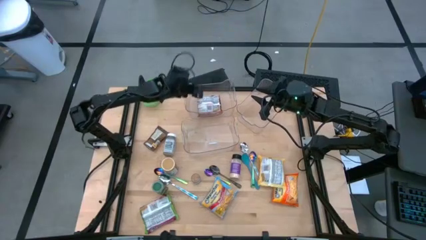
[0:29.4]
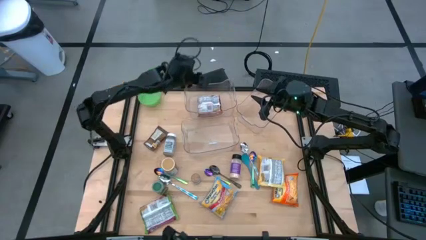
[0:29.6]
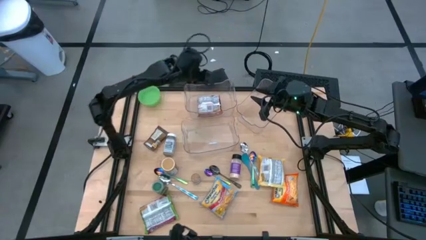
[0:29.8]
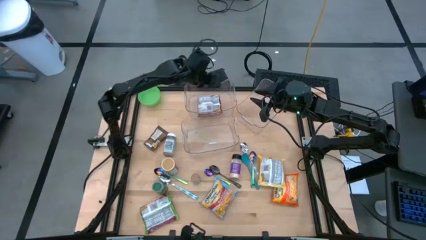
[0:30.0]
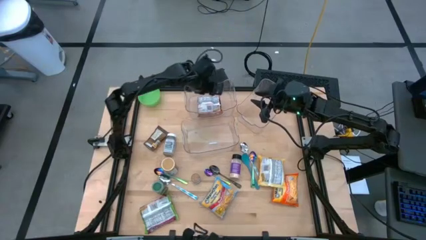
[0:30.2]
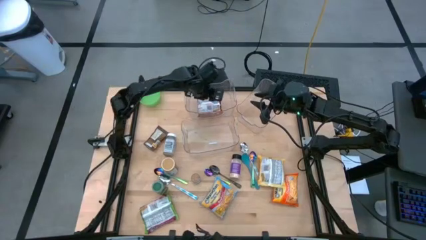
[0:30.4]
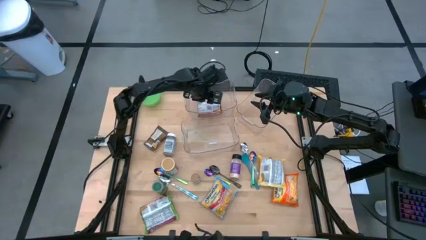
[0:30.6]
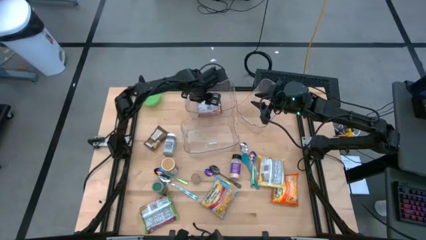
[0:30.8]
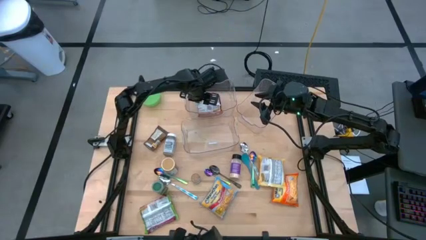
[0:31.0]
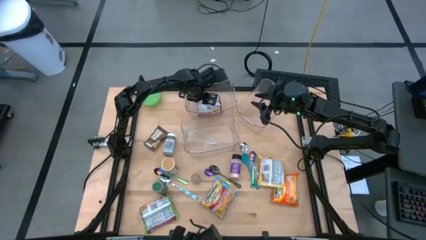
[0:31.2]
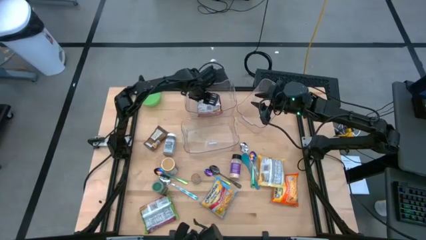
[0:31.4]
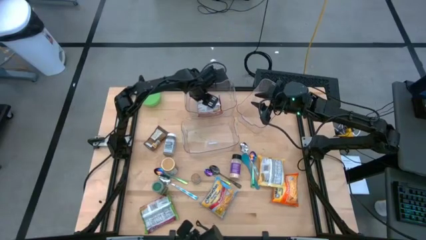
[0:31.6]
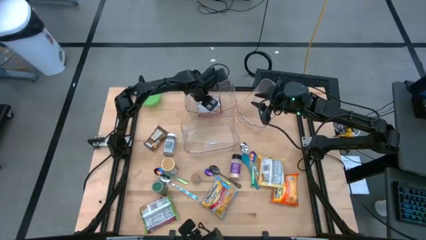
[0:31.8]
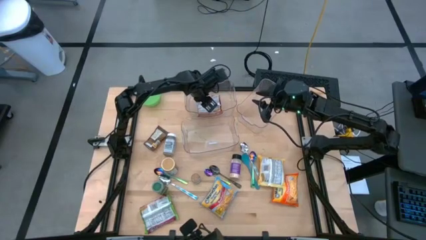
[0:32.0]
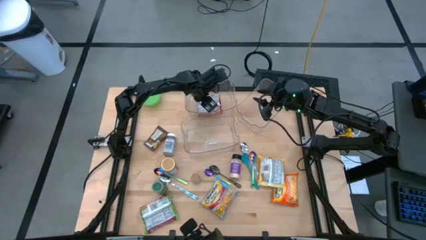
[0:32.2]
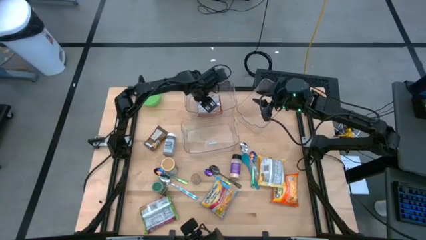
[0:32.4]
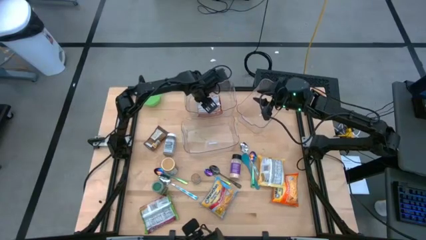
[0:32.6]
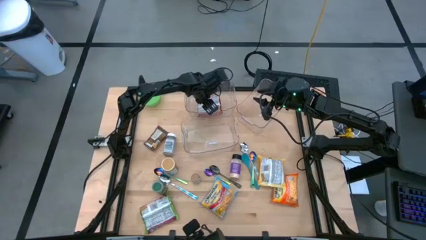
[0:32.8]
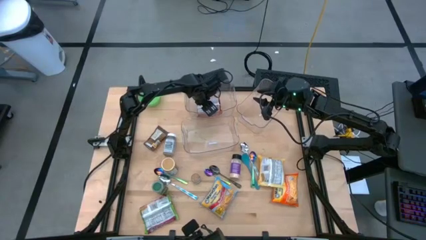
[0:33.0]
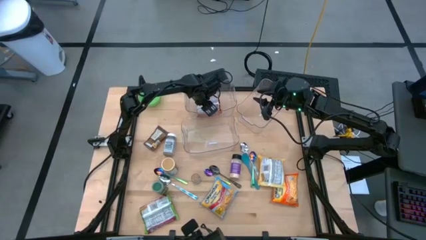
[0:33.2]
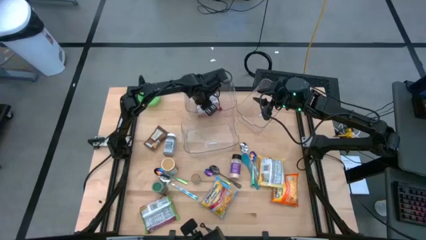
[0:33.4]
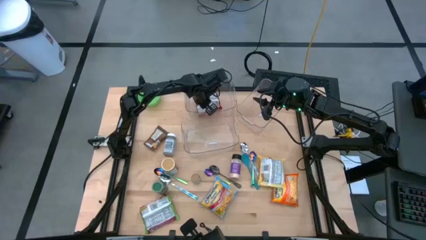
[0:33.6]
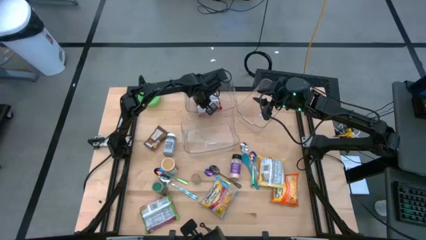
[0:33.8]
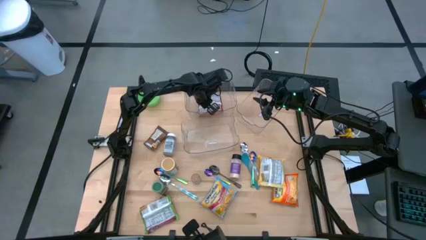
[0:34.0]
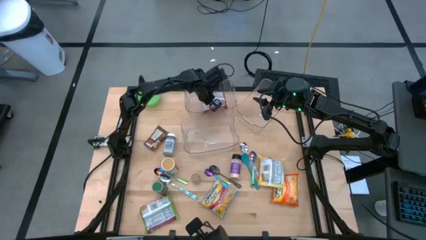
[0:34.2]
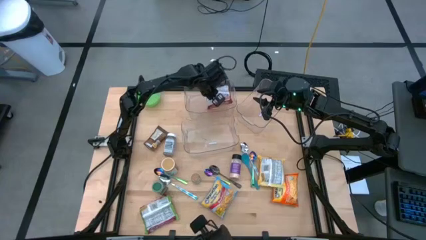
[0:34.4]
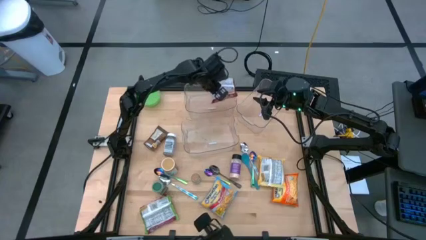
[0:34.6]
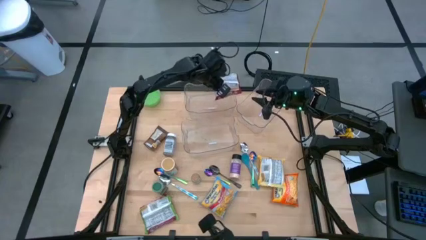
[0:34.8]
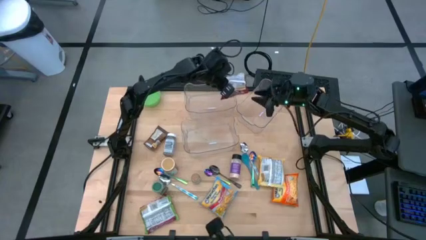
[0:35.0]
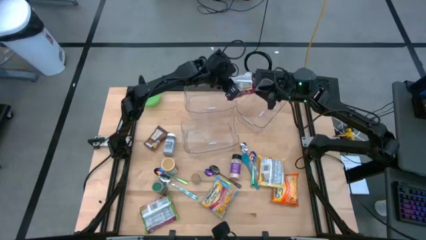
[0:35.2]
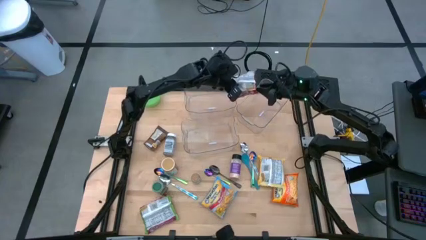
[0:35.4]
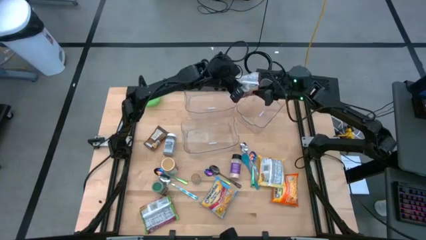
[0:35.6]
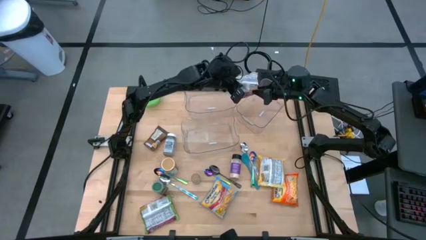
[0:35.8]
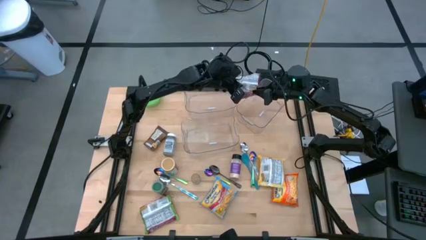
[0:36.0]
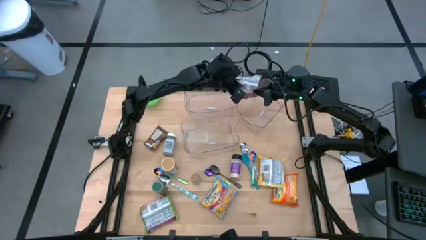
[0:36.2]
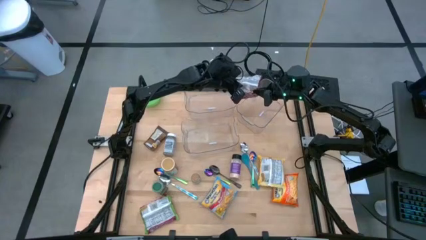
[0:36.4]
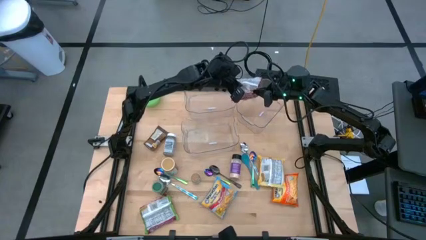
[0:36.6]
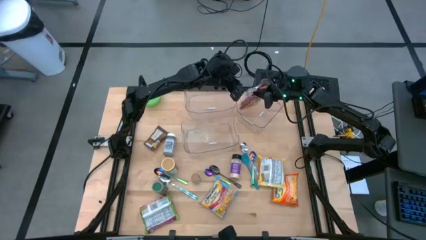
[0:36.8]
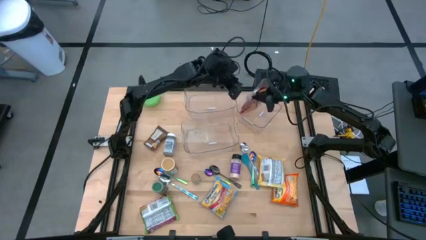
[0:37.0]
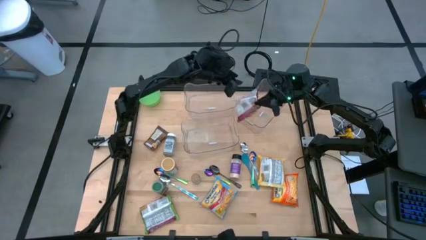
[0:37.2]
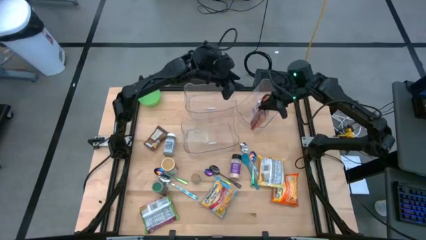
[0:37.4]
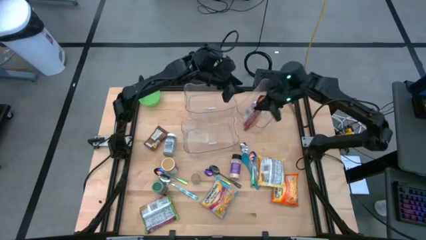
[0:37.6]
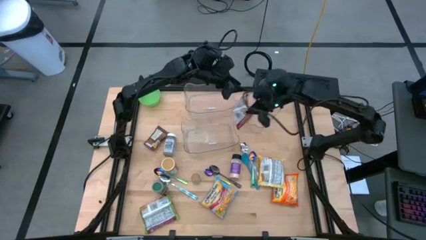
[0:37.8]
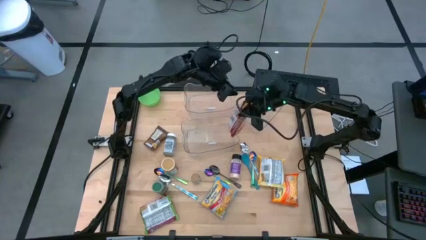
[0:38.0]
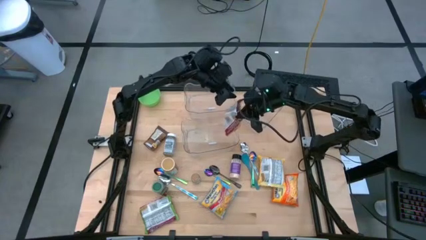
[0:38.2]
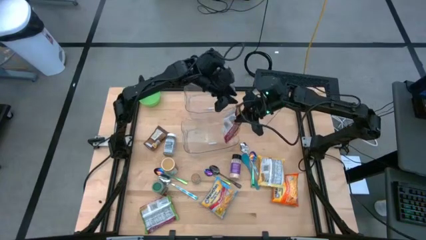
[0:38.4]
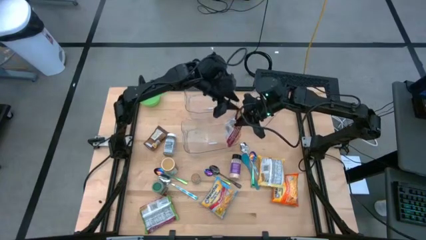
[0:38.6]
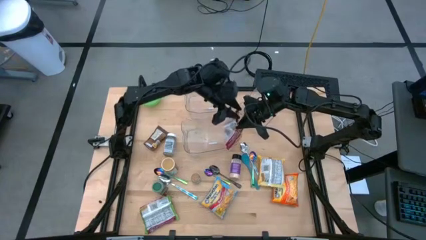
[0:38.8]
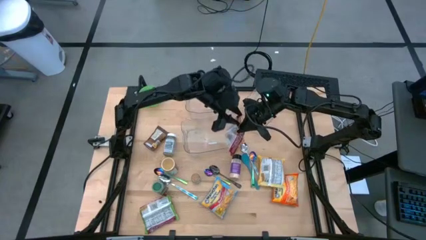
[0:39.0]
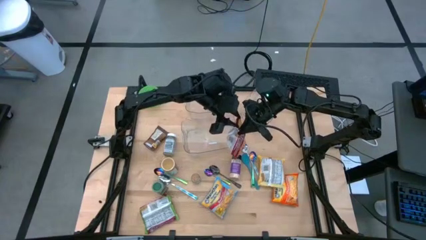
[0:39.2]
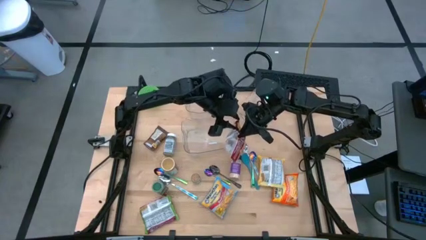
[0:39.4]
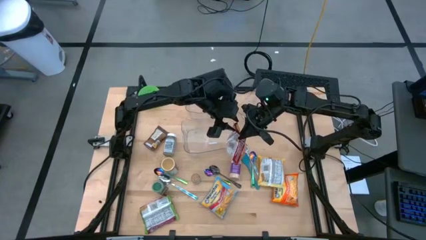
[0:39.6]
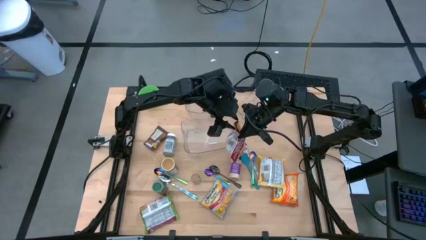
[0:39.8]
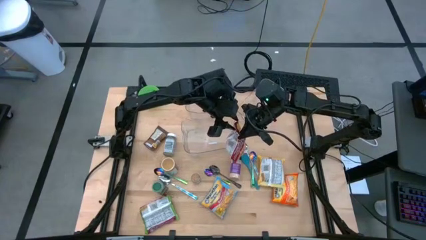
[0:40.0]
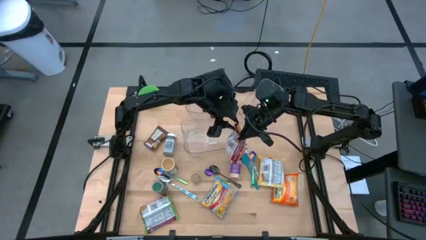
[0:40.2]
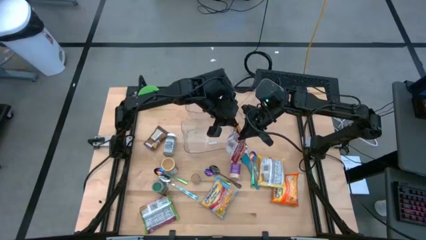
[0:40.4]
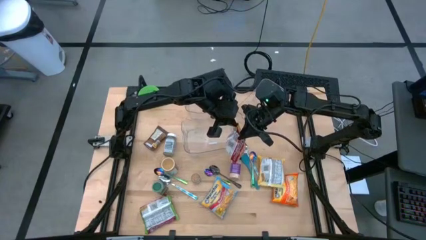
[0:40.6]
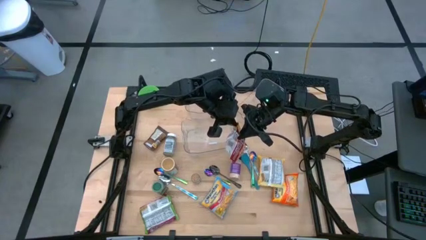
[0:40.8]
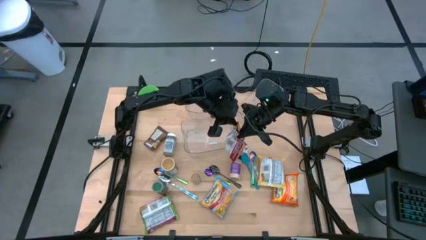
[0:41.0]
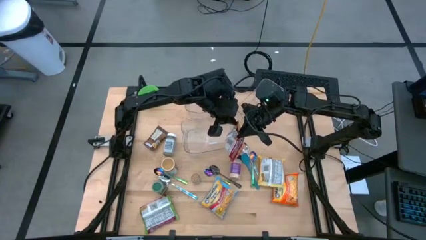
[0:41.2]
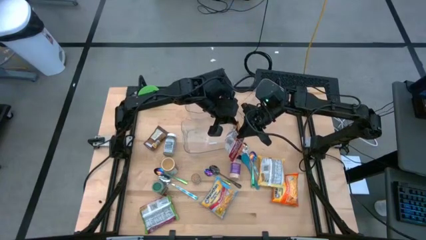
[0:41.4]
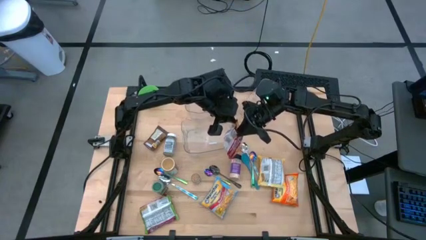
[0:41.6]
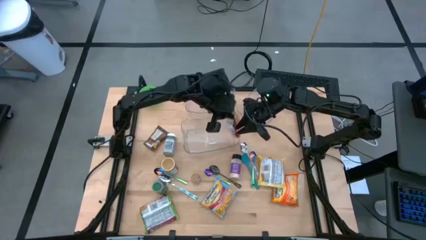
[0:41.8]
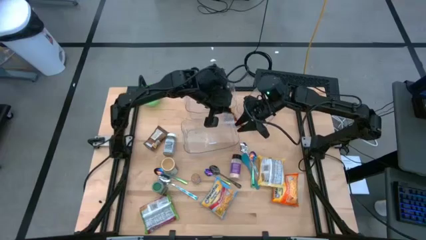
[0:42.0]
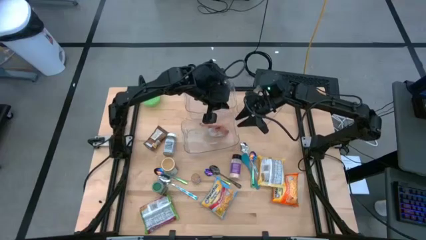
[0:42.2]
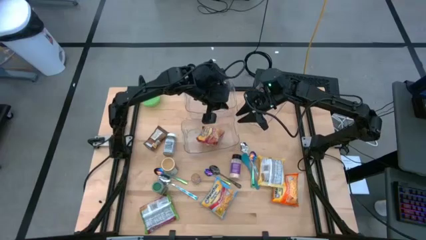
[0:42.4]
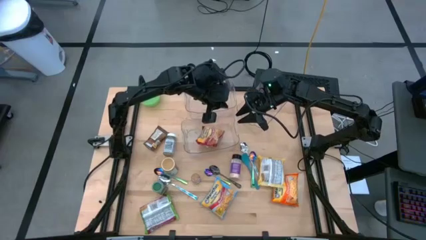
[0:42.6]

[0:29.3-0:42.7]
Task: Pick & Place Food Item
Put the red noodle pack into the top left transparent bin
